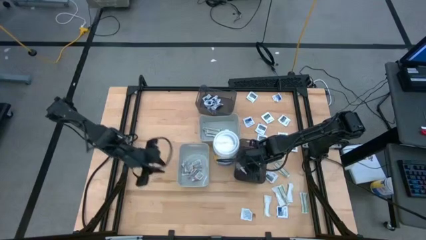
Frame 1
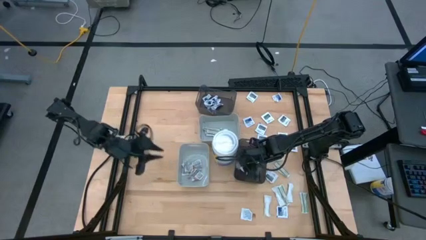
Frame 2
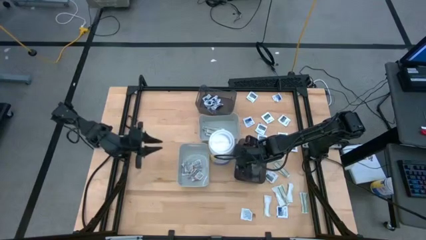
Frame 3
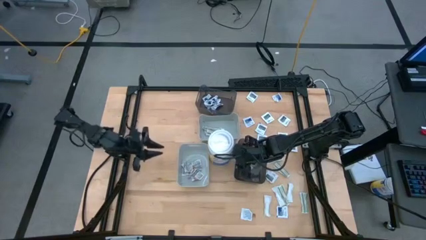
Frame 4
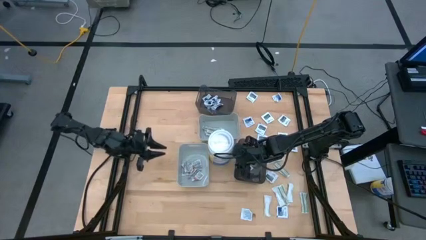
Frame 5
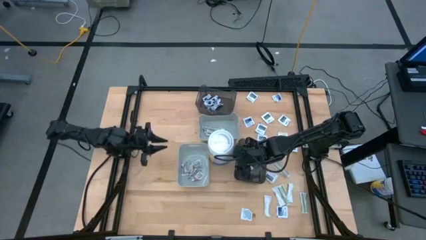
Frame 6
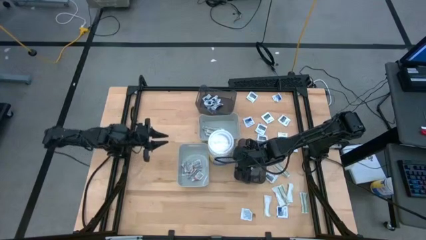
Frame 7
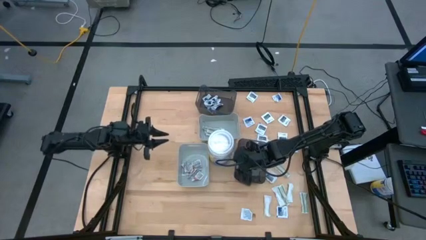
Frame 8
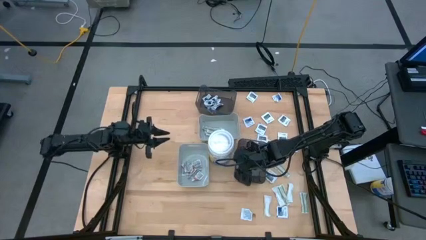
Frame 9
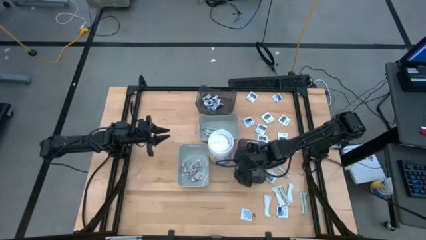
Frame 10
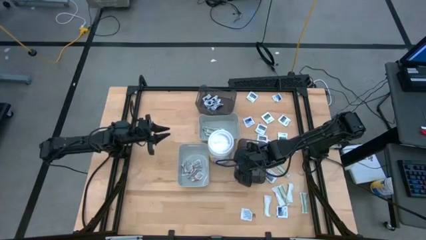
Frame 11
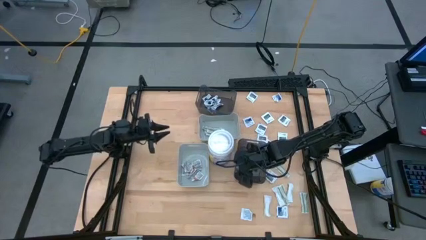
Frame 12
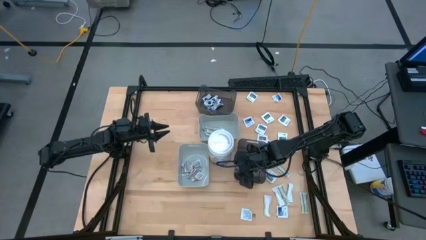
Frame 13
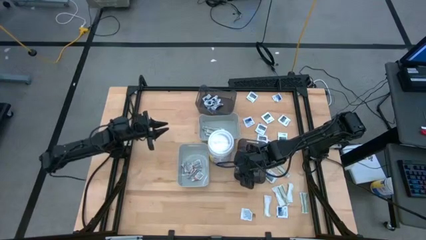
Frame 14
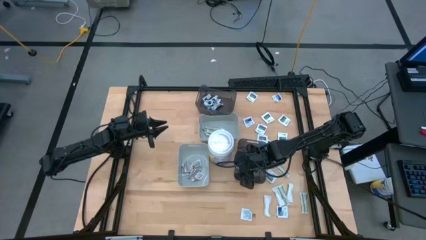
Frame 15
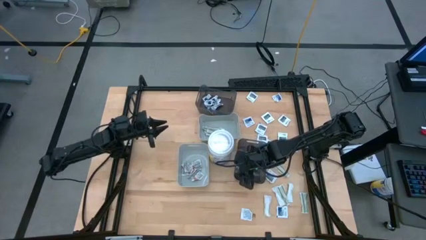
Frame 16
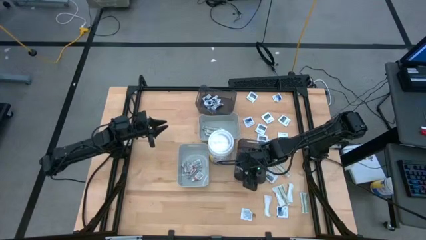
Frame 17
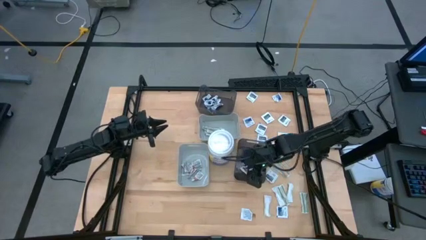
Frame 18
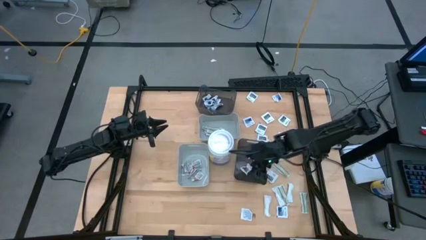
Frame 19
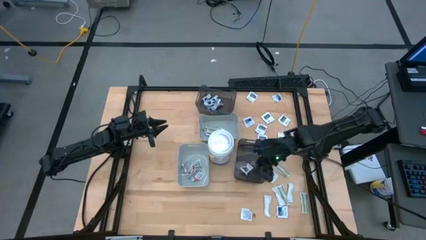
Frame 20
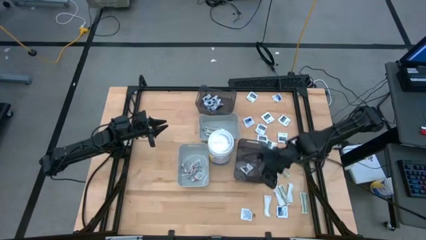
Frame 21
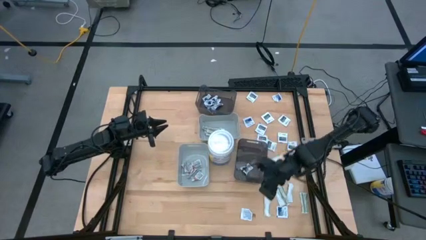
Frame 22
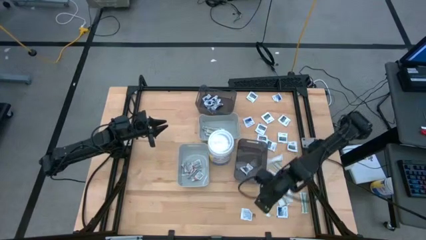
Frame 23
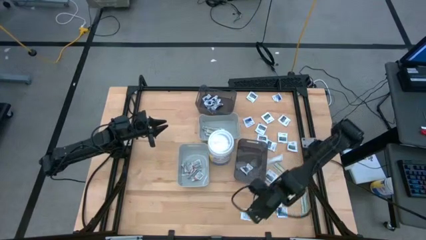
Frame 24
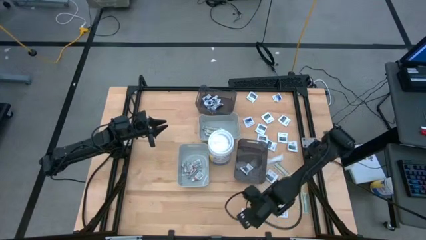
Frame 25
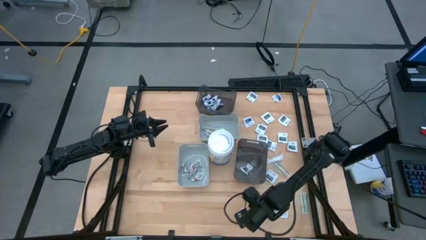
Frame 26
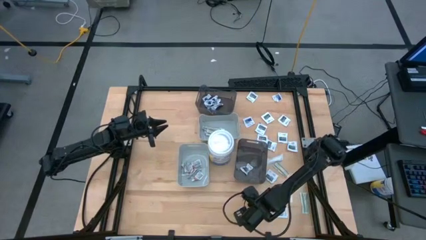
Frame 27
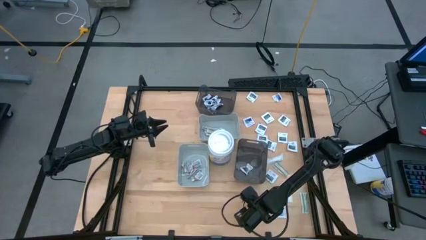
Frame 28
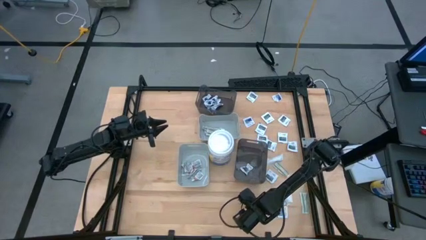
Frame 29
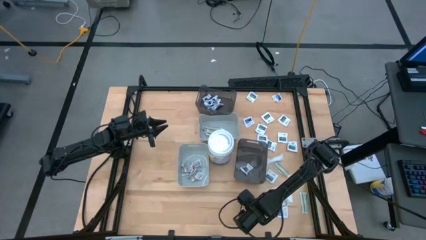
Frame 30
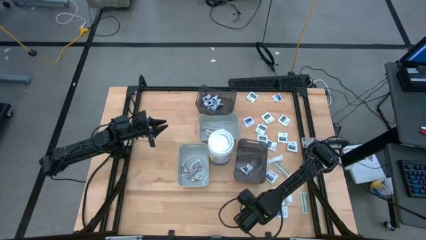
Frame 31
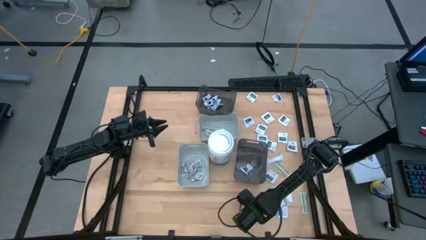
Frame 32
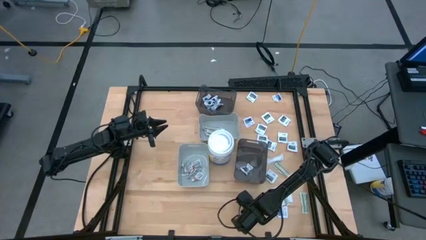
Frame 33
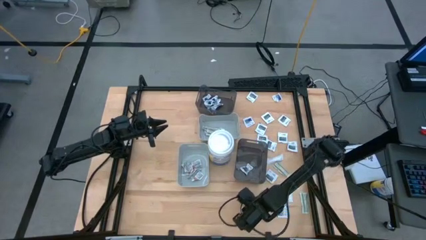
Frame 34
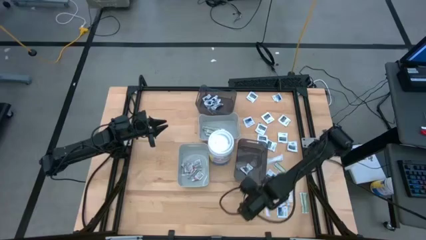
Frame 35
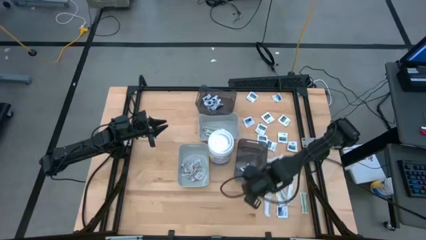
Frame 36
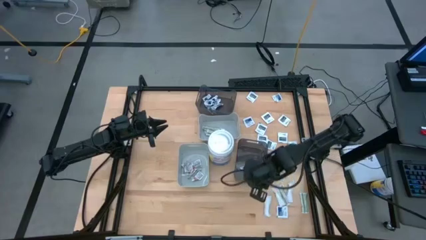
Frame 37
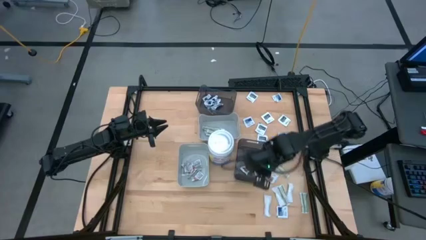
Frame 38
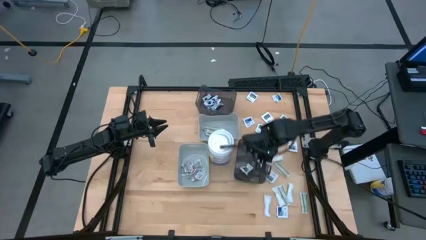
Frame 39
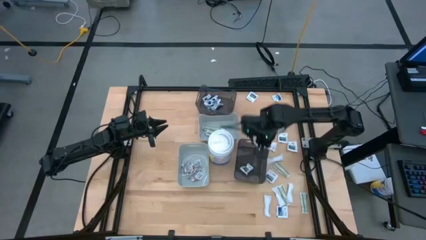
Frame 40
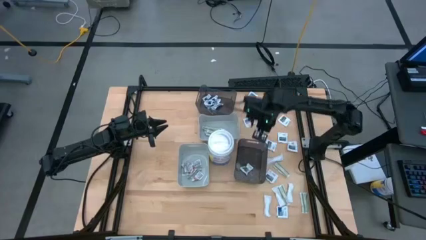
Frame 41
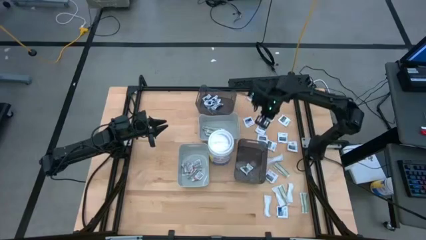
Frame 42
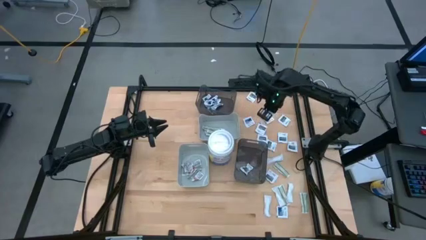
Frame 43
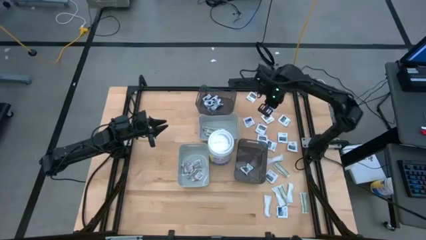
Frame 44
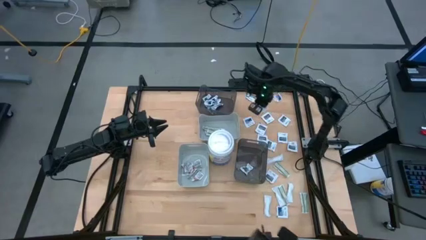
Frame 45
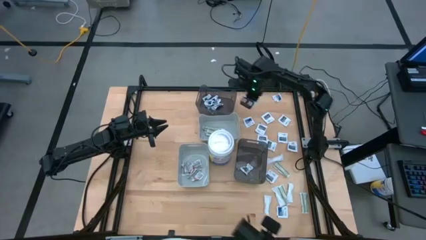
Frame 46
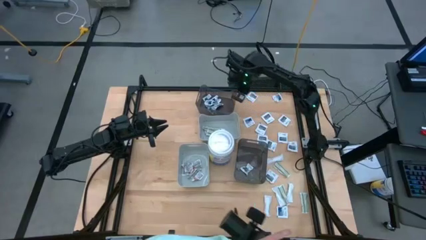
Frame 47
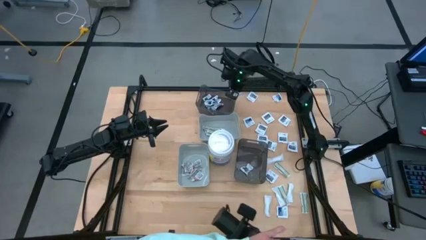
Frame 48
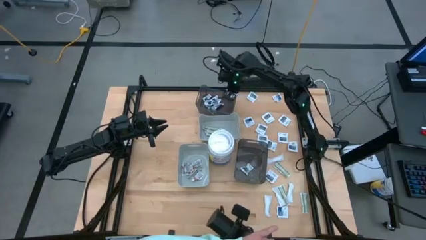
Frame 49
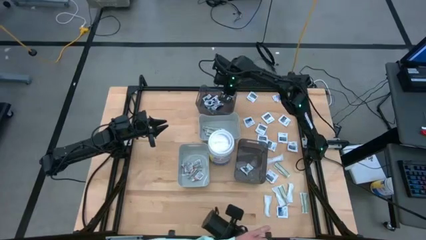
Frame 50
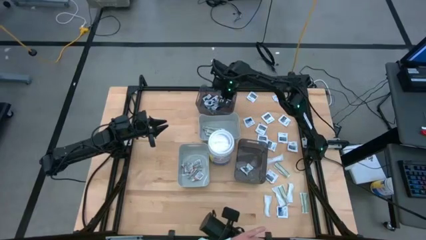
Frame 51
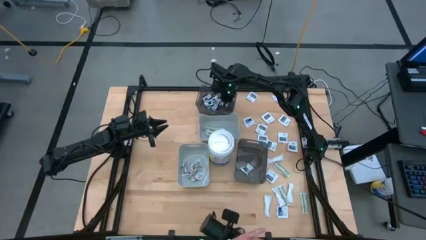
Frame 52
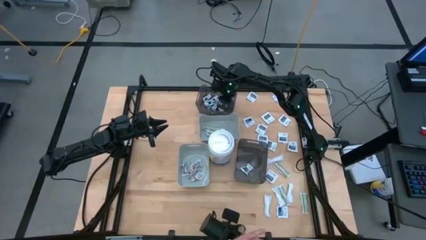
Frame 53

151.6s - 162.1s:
Task: Pick & Place First Aid Supplies
Put the alcohol pad into the top transparent black bin

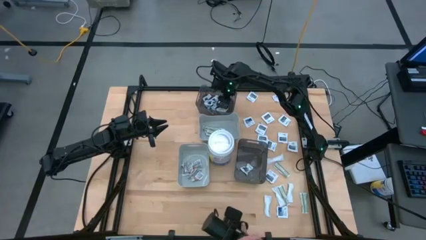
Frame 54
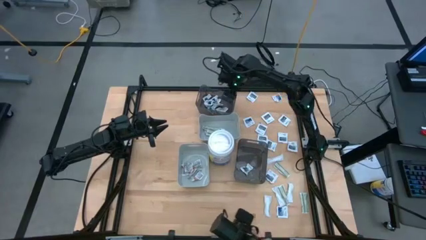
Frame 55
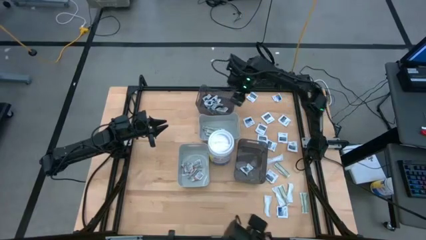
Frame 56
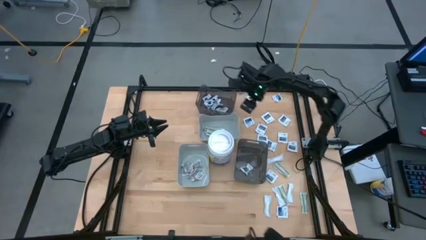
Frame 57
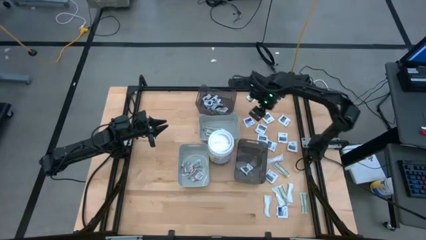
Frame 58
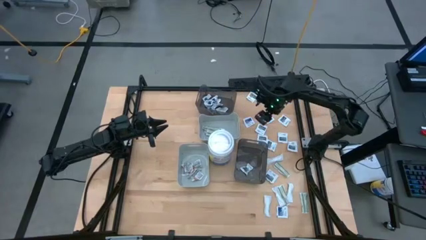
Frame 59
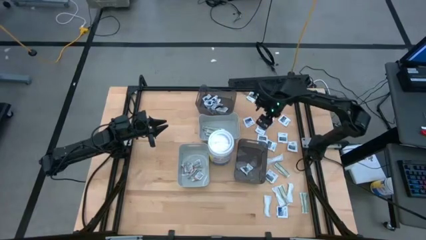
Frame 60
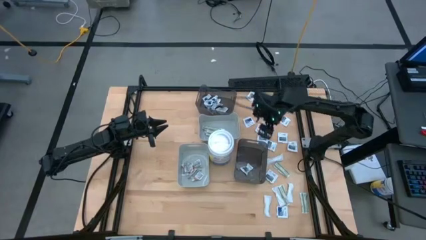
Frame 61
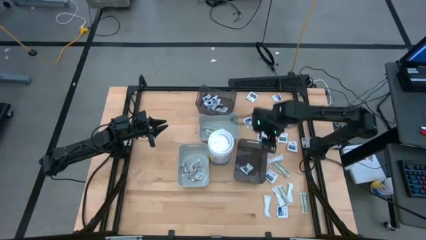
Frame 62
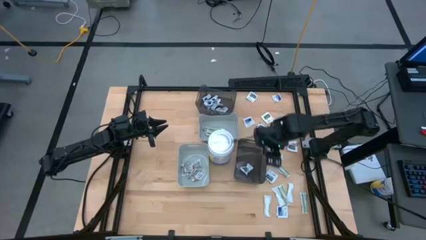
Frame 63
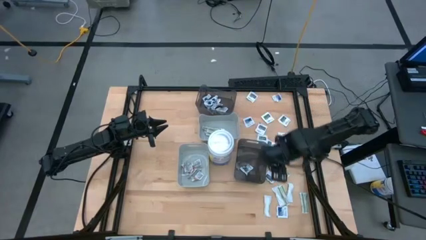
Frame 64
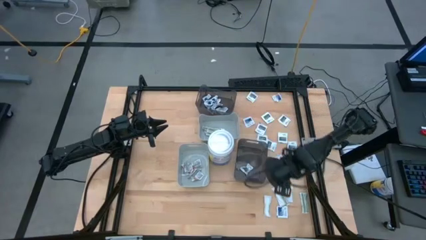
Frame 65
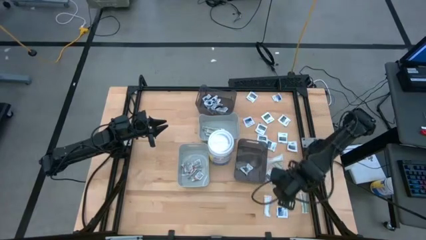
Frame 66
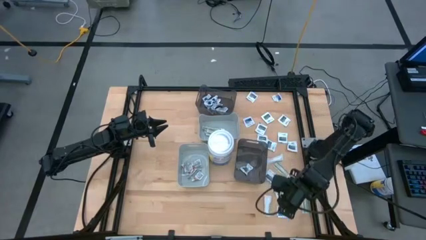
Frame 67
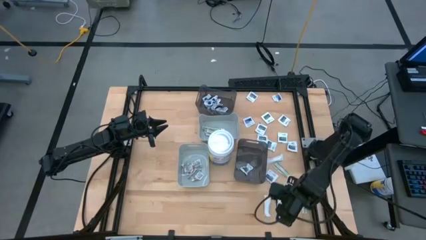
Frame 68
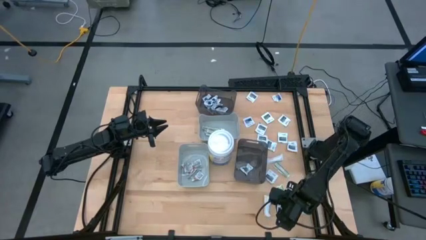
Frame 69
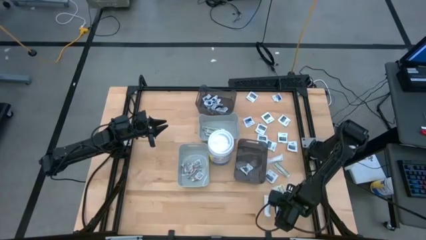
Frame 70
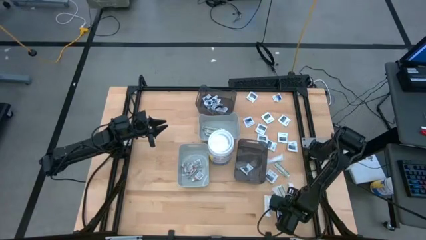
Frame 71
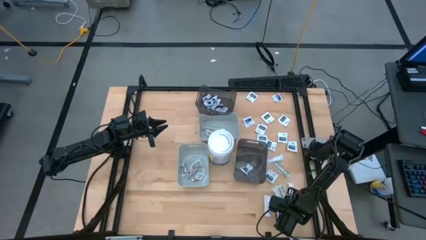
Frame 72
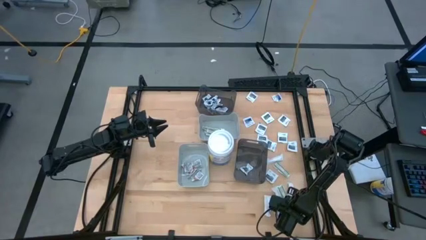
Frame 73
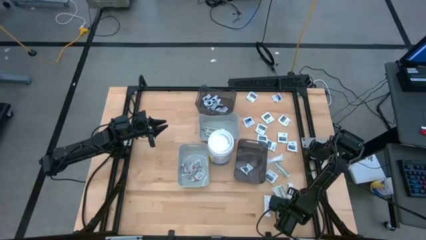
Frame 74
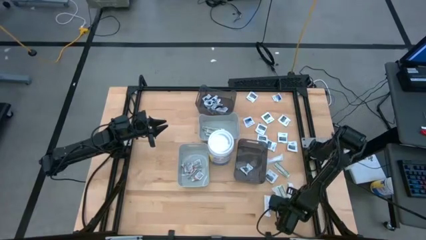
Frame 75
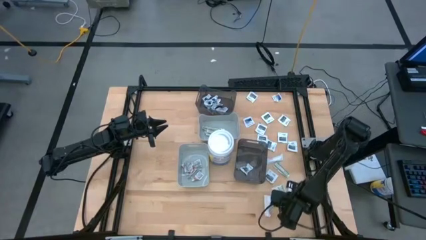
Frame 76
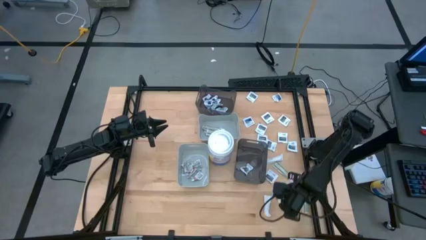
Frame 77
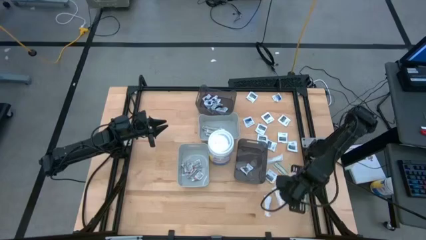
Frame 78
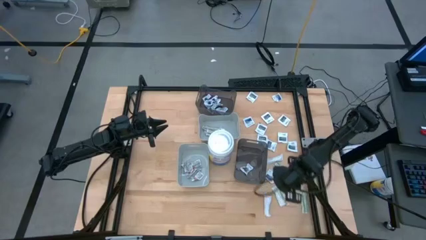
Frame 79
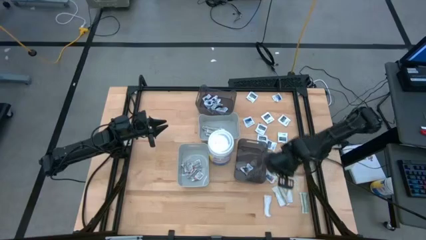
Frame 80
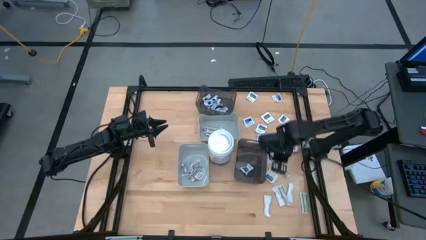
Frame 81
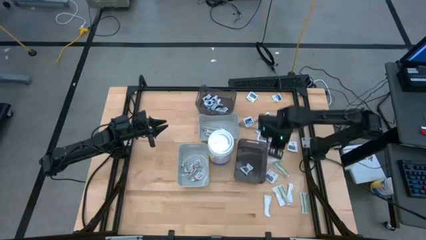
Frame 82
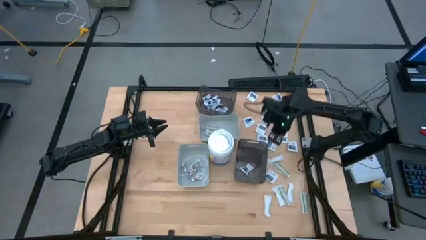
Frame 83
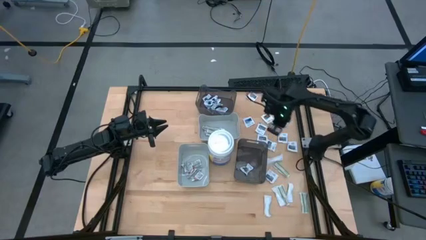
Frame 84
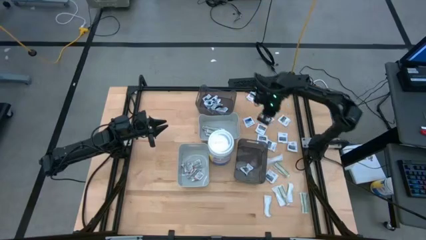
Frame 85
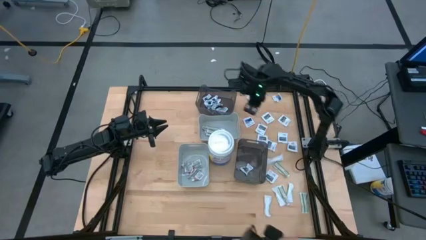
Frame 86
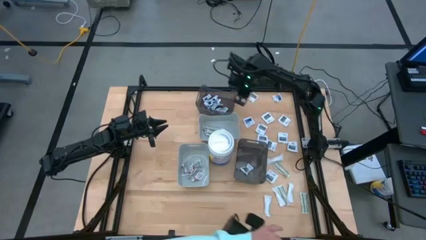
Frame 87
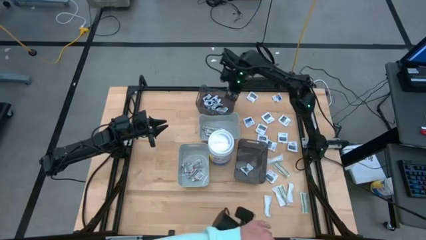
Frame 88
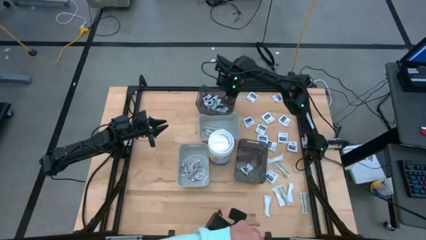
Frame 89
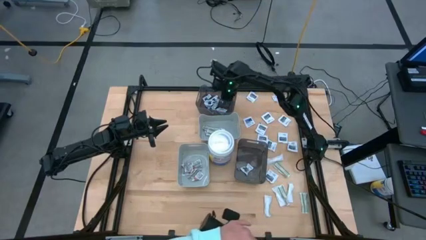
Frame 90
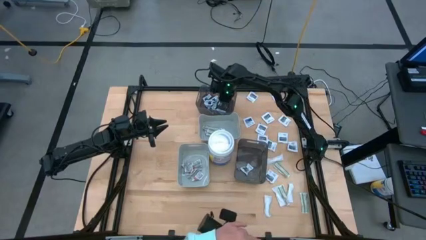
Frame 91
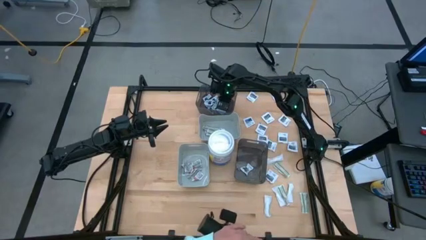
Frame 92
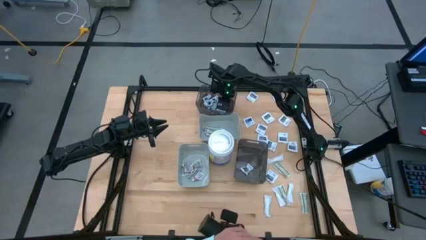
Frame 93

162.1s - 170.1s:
Put the alcohol pad into the top transparent black bin
